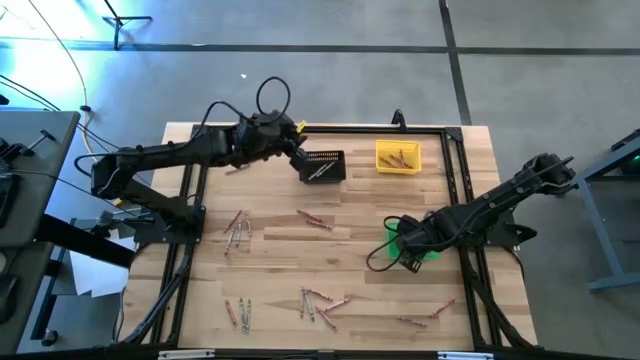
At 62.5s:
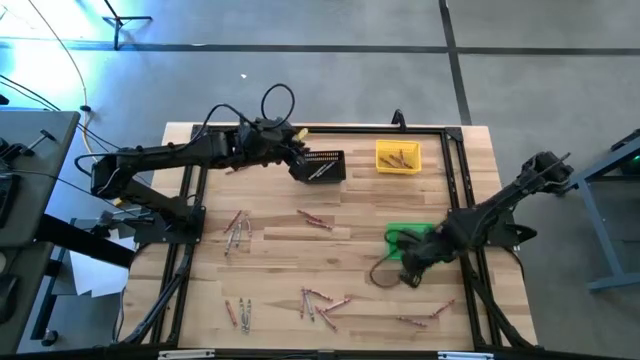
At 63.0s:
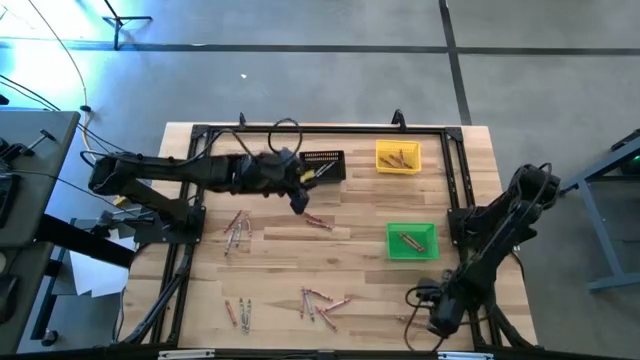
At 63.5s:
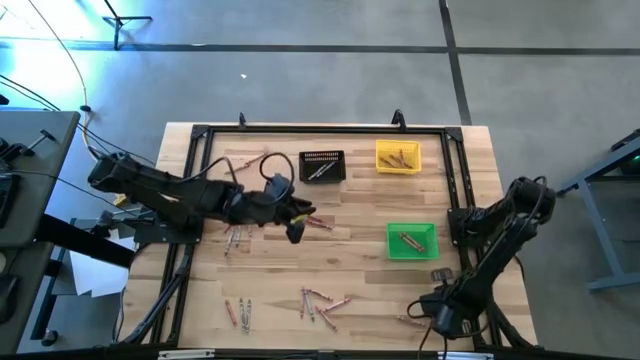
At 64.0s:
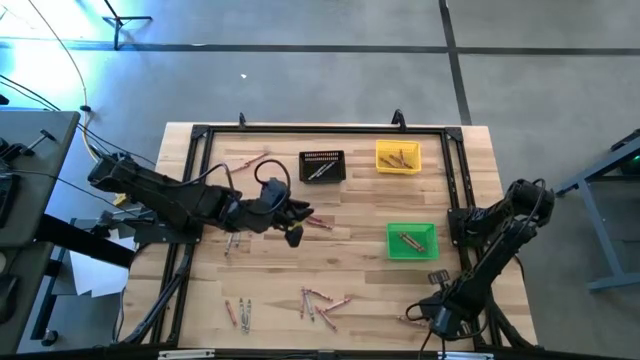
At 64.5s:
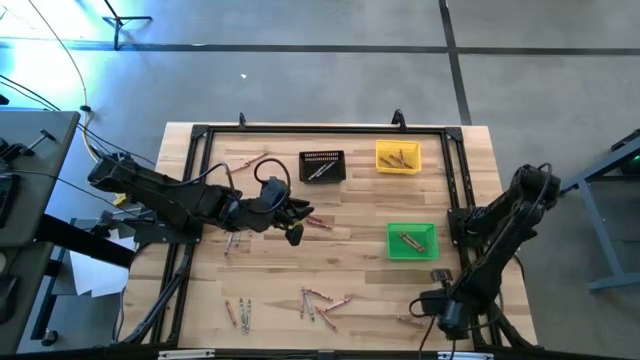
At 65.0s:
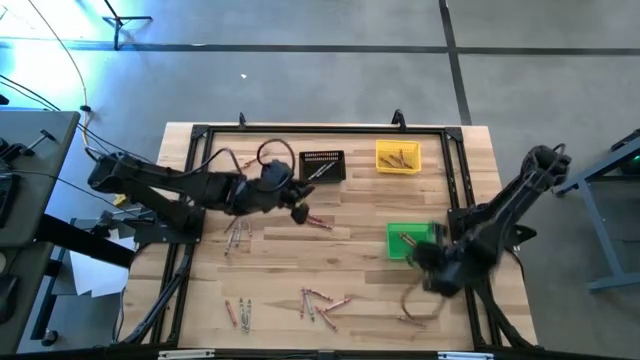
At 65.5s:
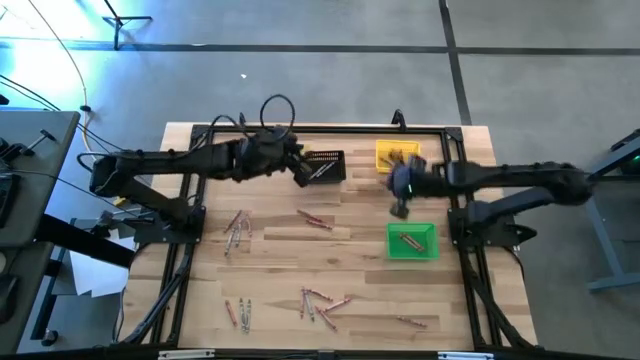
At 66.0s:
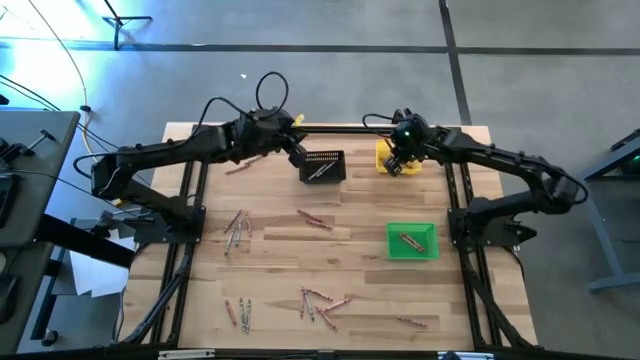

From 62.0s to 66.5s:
Task: Sort crayons
Put the red crayon into the yellow basket

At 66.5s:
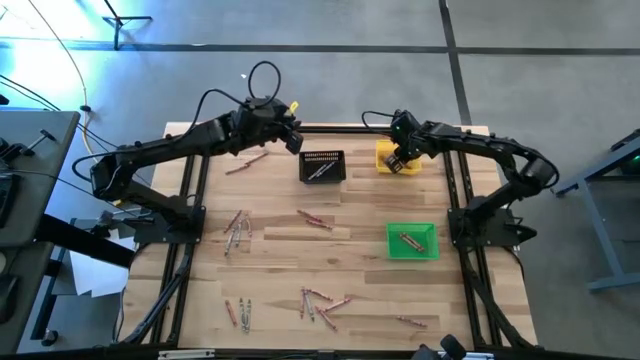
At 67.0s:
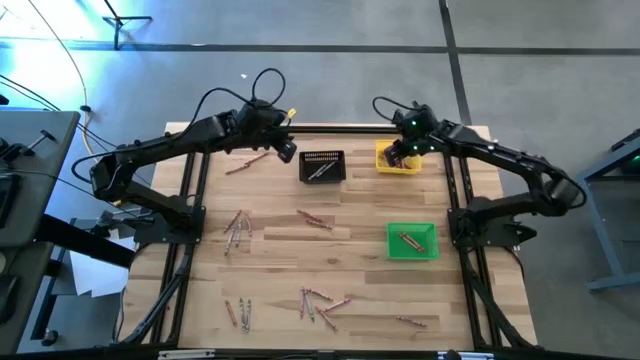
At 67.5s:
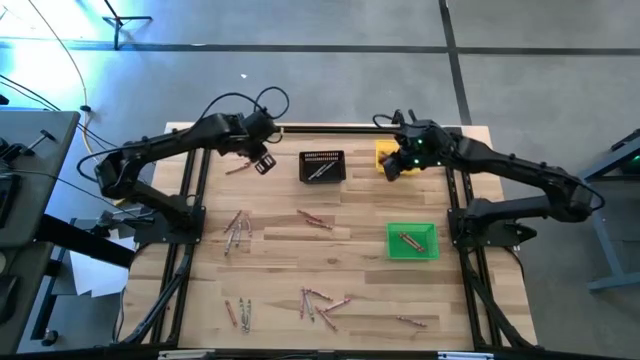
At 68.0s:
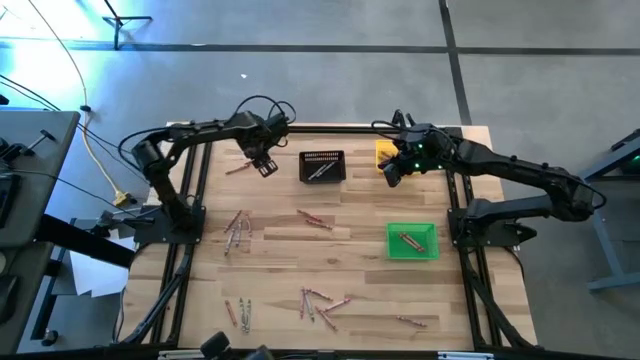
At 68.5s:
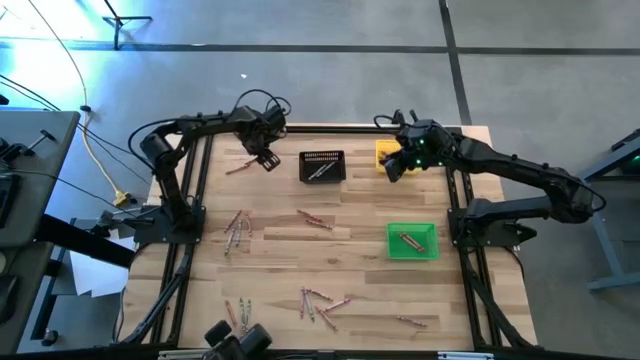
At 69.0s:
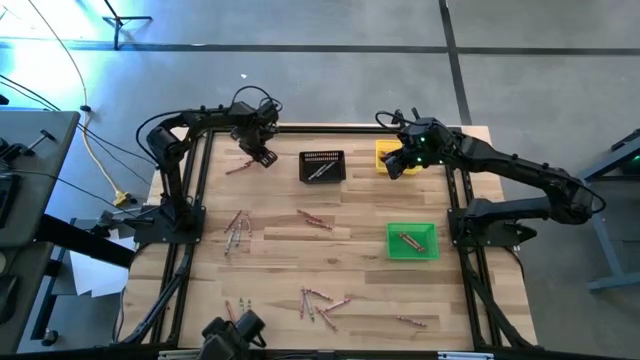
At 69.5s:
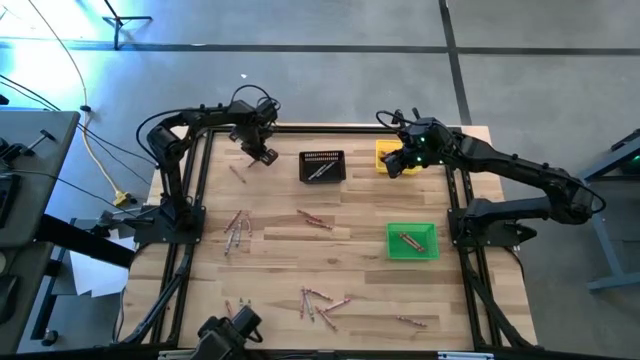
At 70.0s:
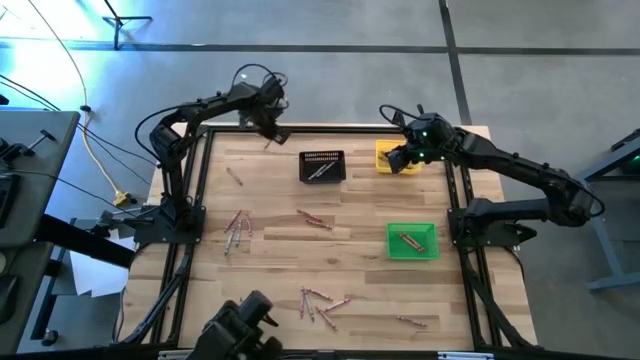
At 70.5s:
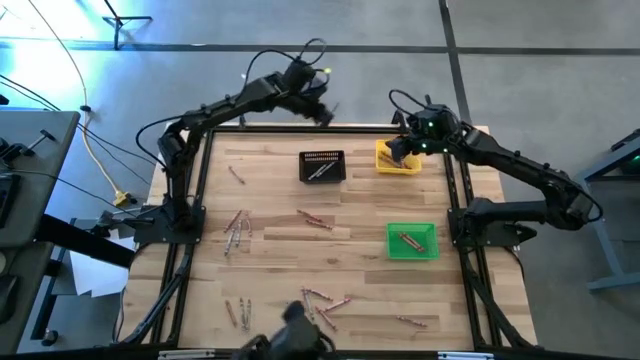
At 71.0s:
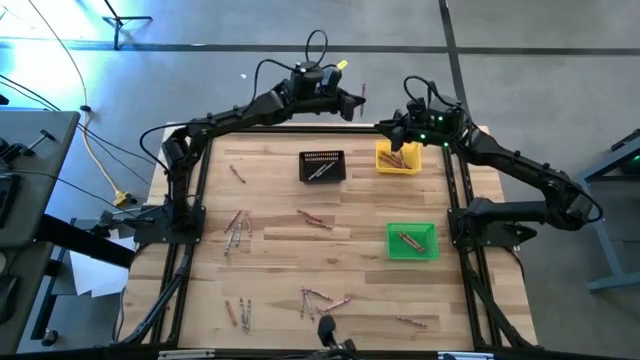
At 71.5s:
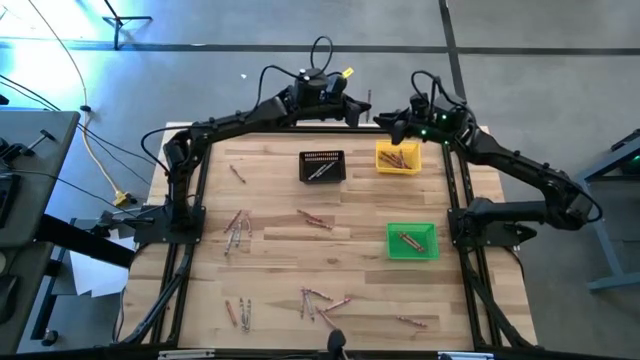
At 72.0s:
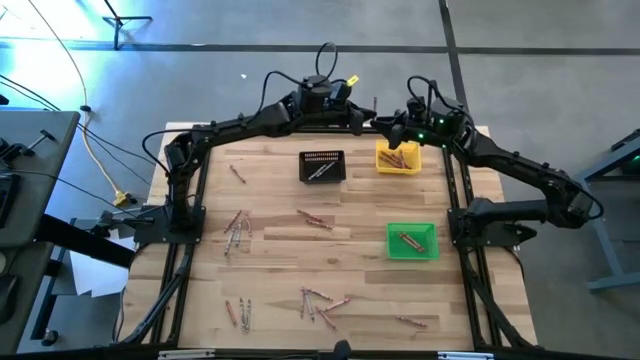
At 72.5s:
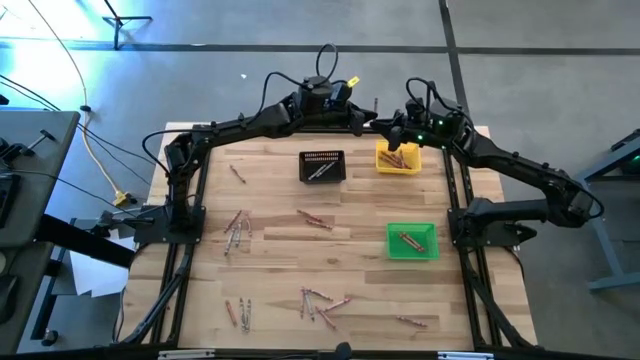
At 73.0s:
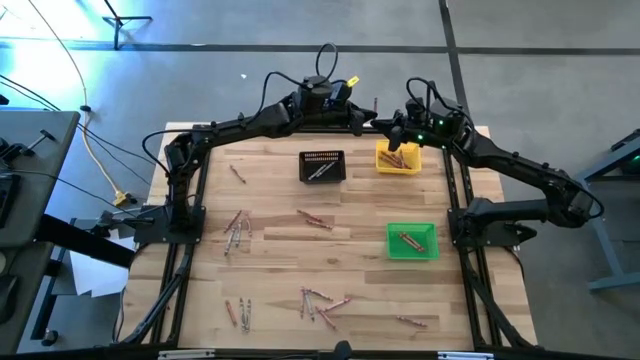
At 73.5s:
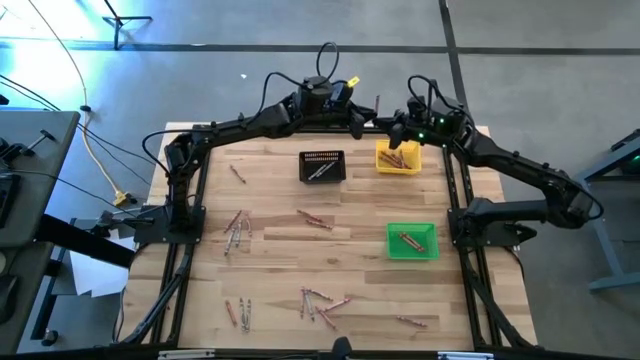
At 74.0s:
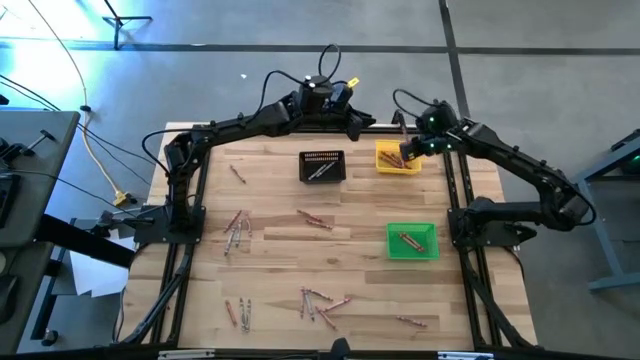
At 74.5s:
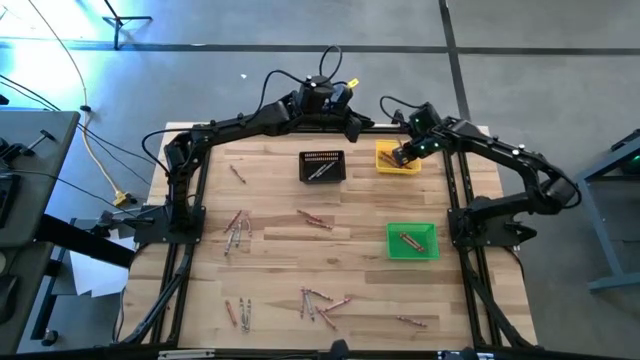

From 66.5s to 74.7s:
Put the red crayon into the yellow basket

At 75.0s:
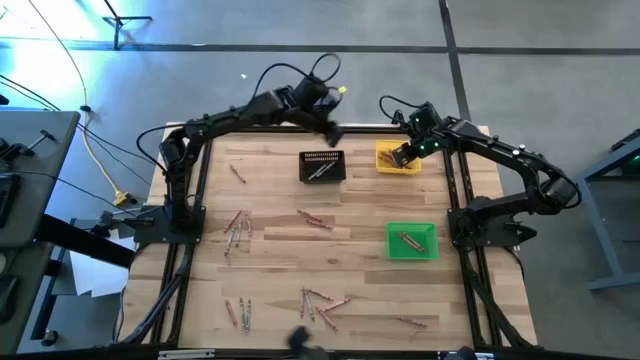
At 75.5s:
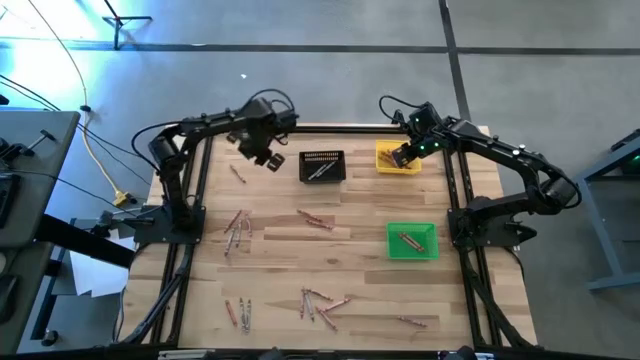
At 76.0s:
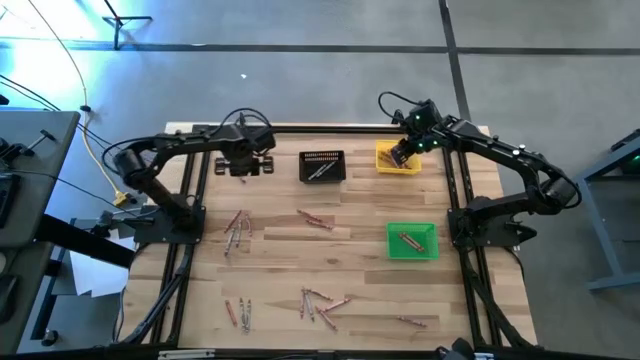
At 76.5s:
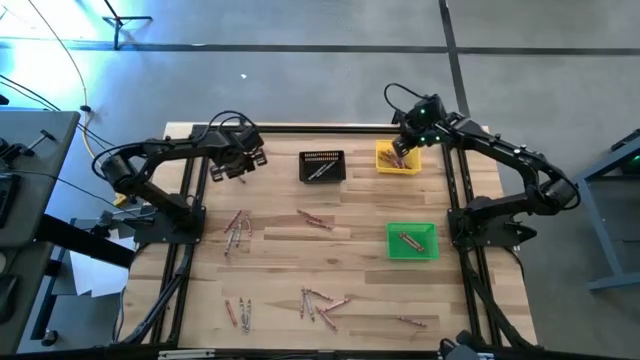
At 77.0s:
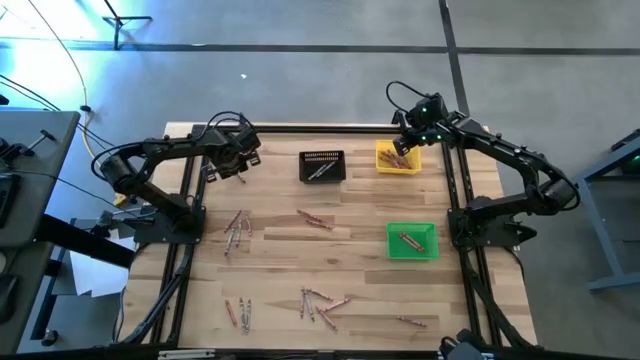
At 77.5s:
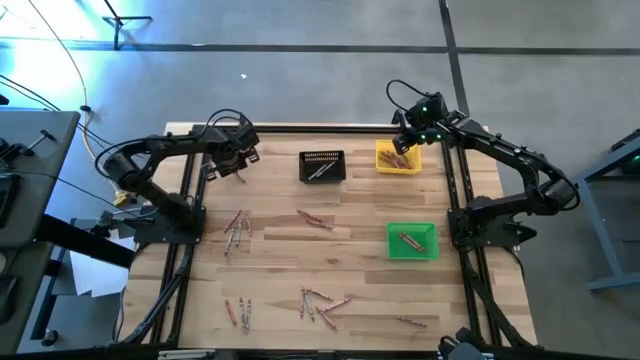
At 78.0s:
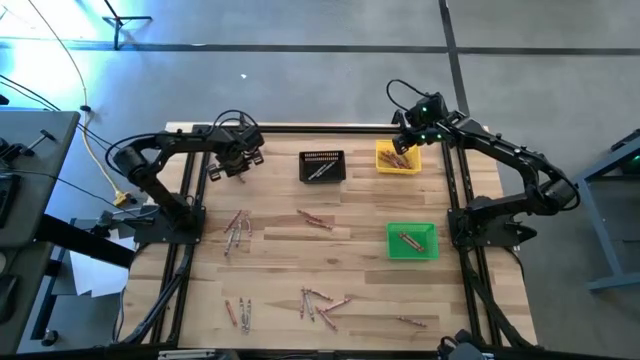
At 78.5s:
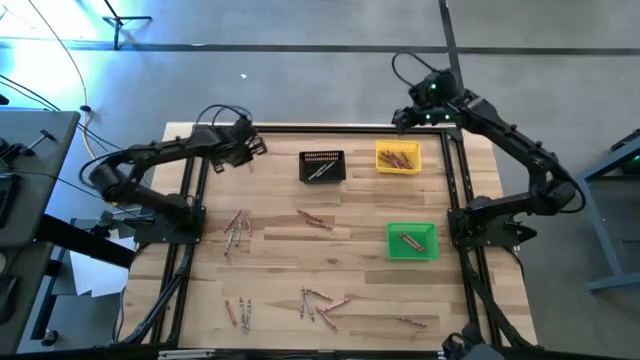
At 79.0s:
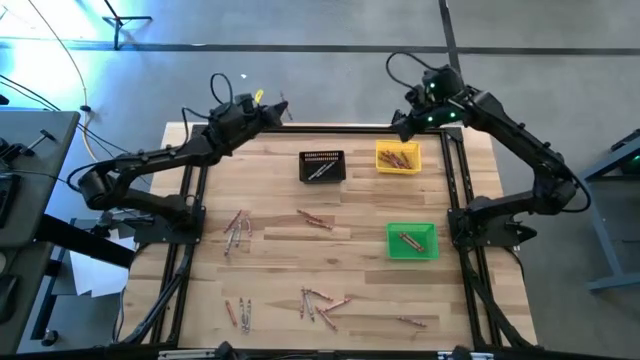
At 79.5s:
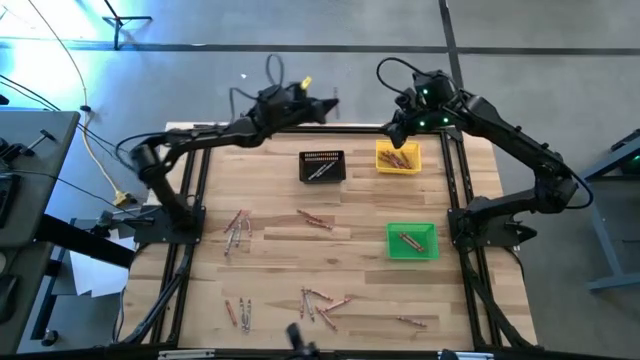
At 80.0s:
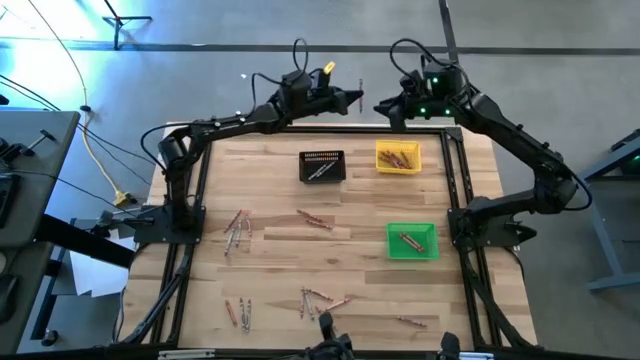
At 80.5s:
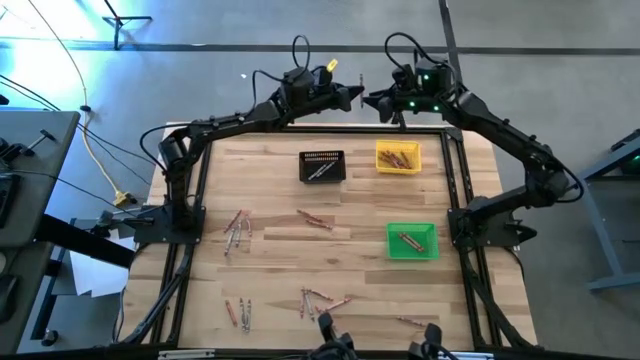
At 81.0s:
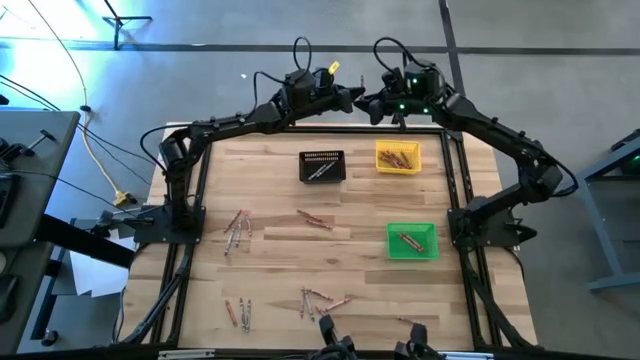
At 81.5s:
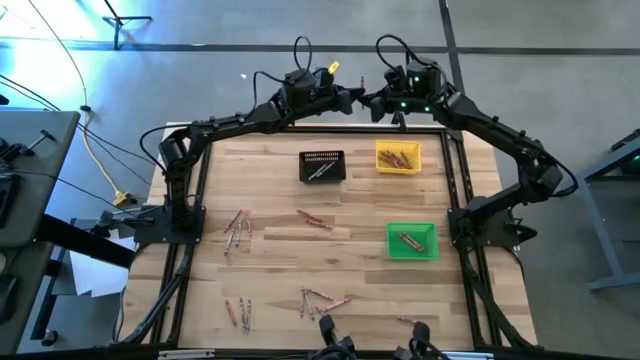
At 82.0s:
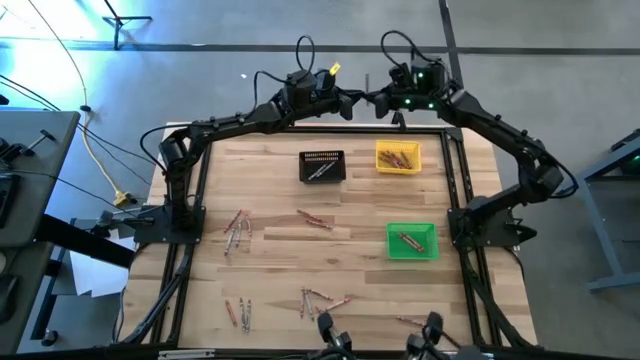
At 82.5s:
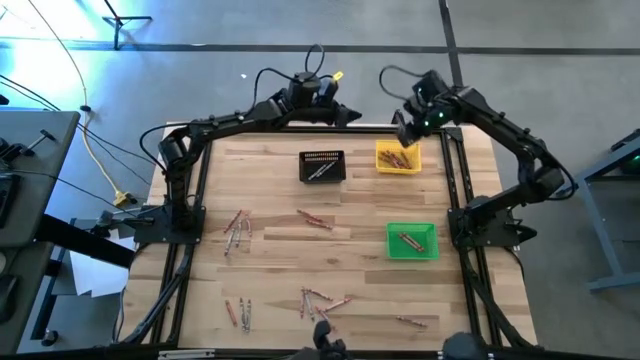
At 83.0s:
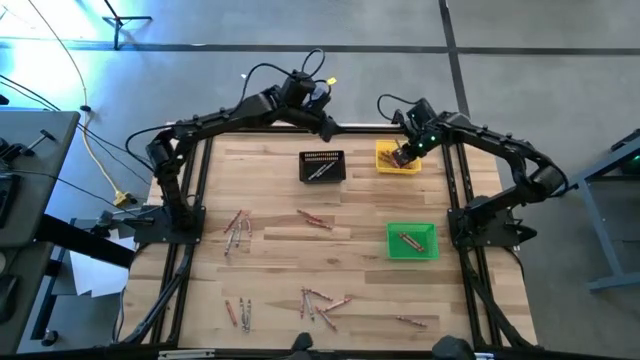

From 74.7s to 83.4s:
Put the red crayon into the yellow basket

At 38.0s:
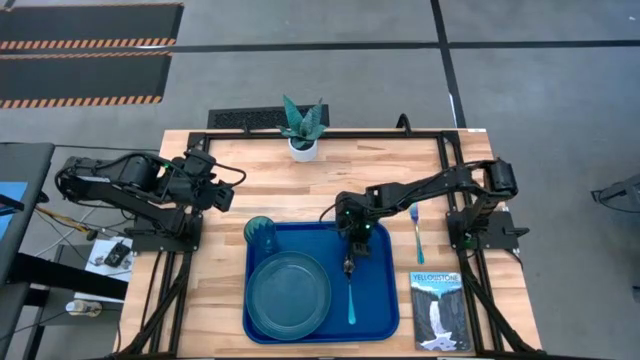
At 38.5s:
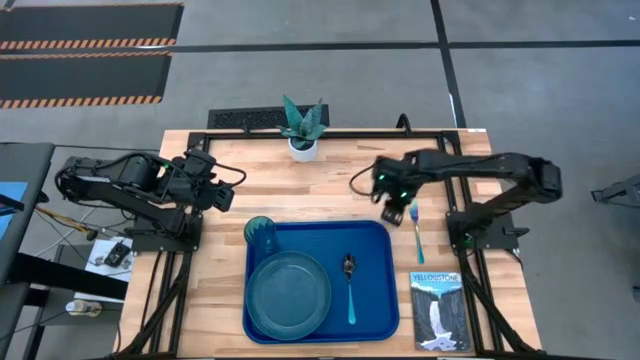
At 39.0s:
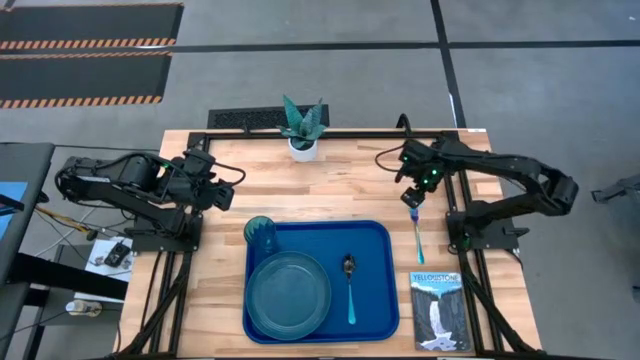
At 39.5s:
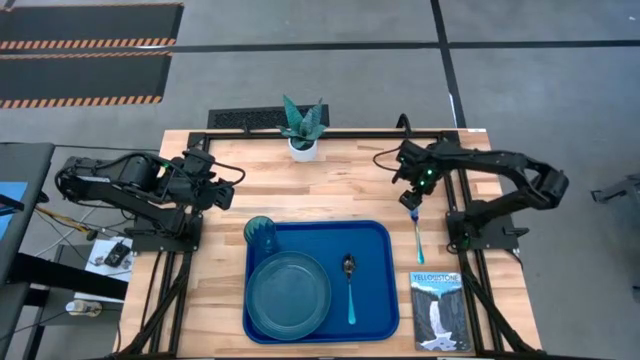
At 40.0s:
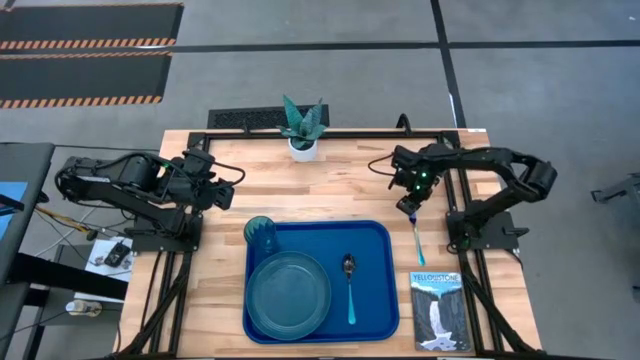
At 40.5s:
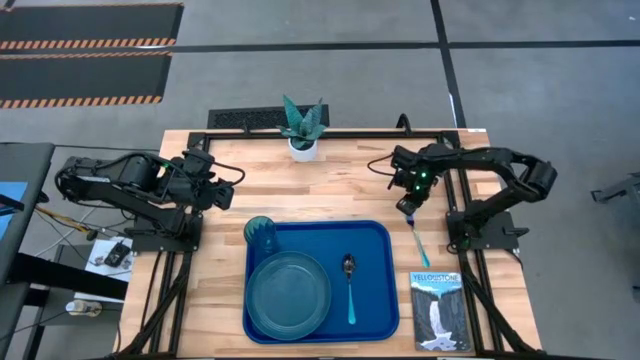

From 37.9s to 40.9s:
Task: Pick and place plate/cup/fork/spoon on tray
Put the blue fork on the blue tray to the right of the blue spoon
